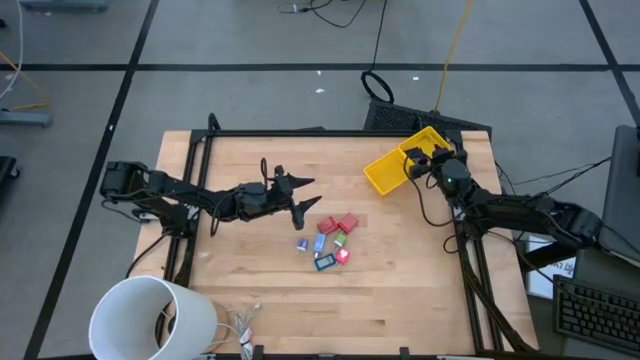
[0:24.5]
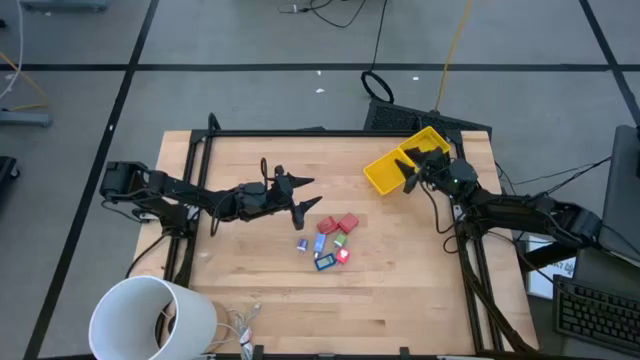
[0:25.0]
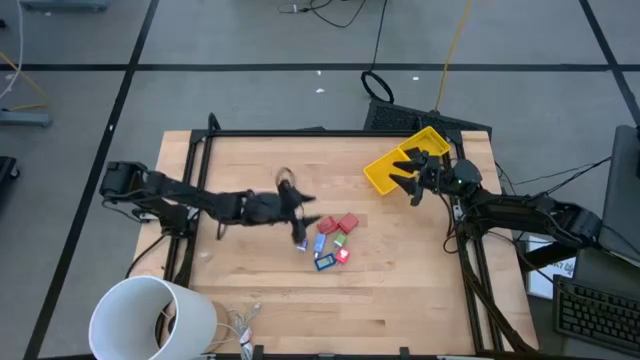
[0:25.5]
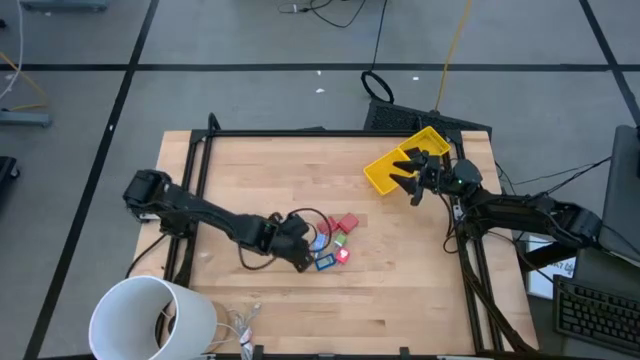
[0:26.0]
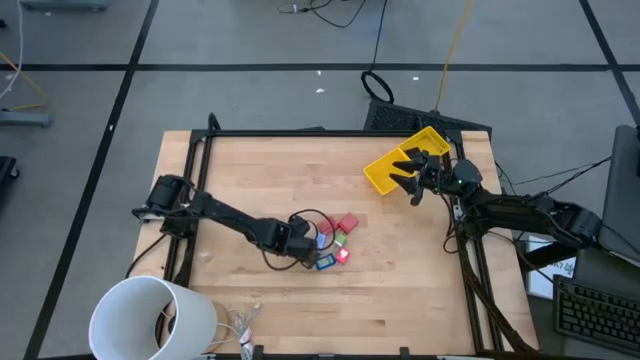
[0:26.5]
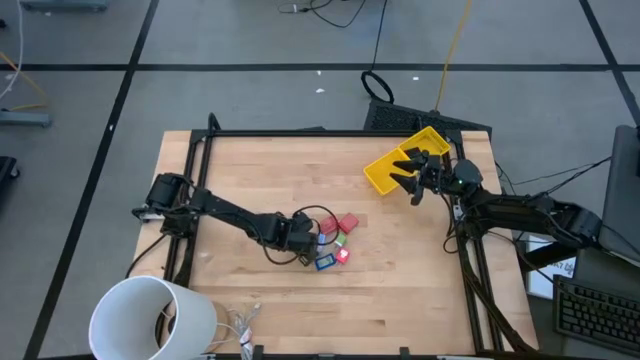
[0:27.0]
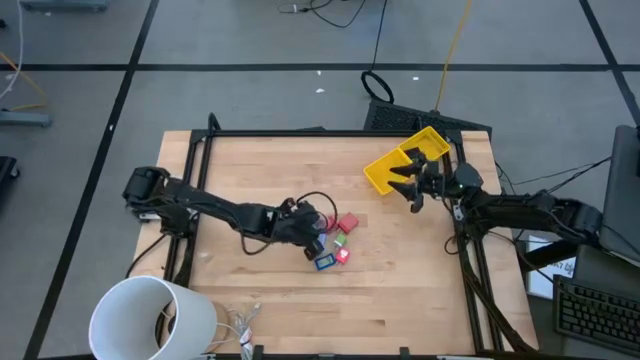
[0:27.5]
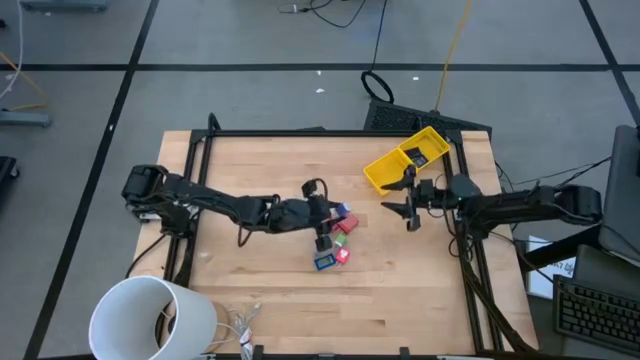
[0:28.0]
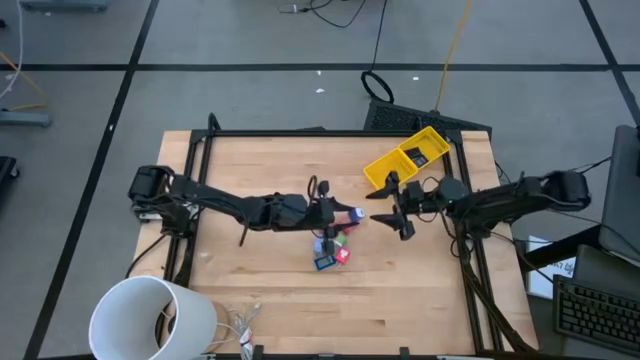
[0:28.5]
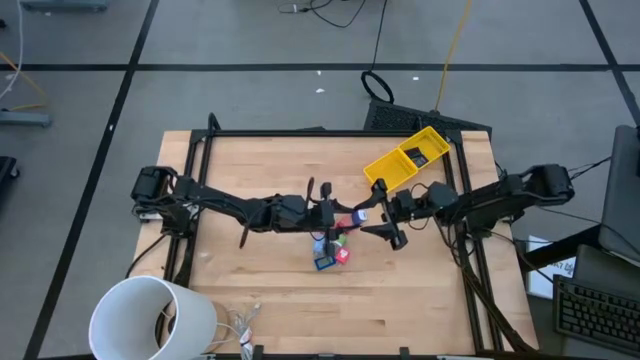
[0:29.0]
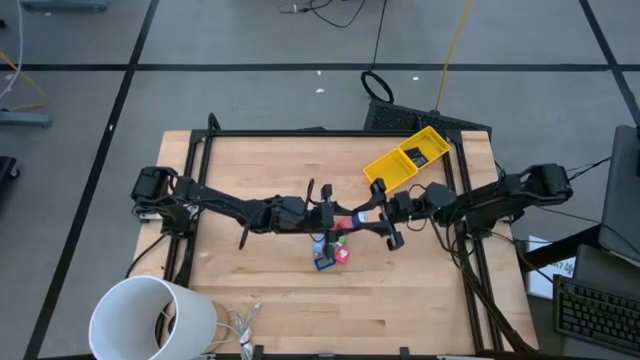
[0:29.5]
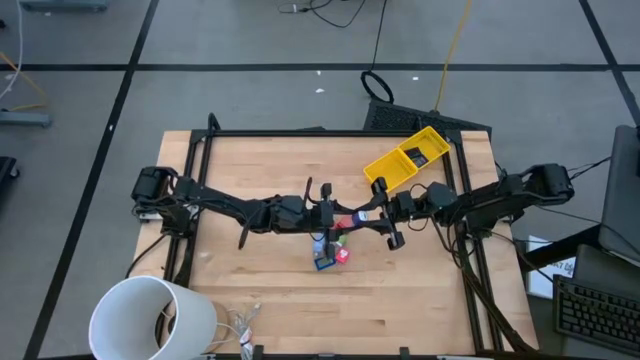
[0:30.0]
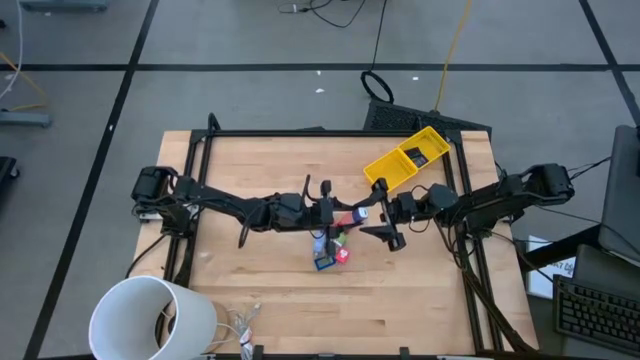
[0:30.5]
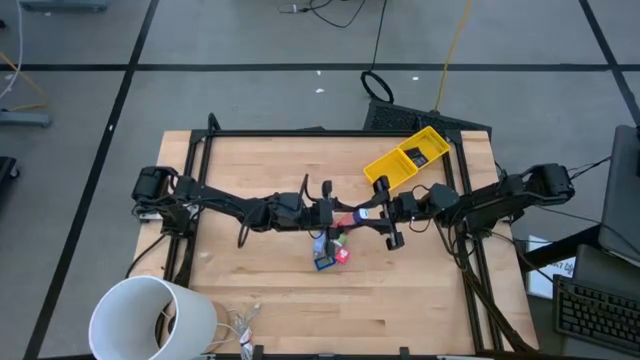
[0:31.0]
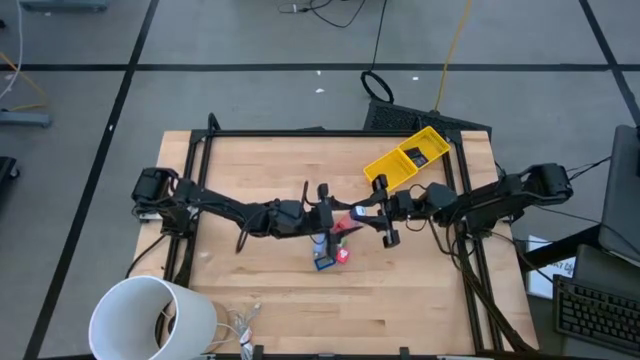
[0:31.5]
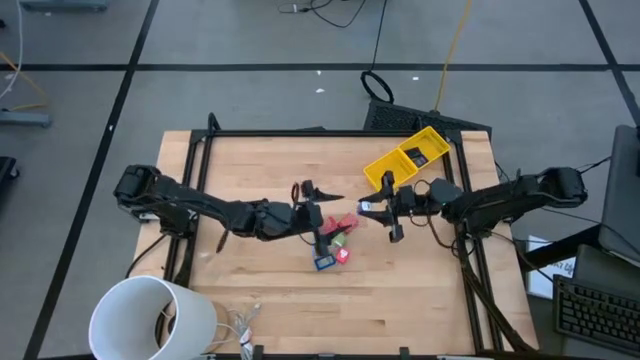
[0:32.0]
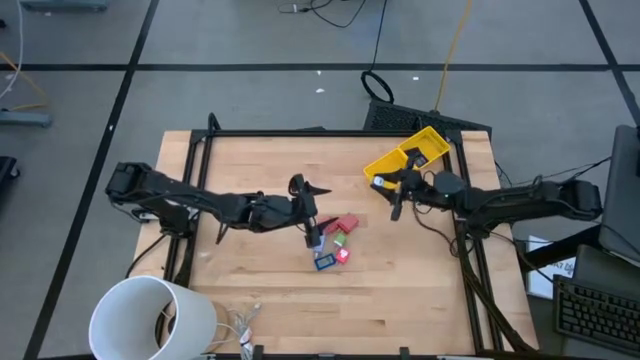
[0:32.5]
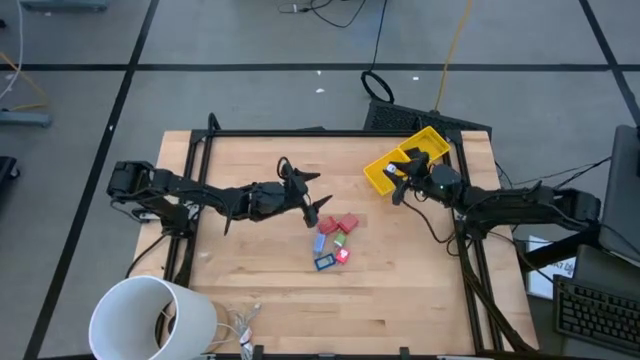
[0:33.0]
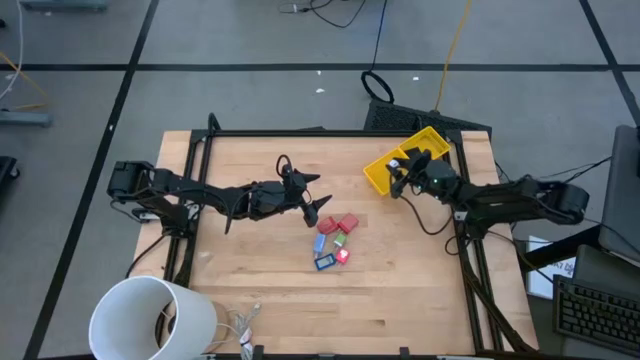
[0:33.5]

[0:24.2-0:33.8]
Task: Pick & Place Office items
Put the violet charger adapter into the left yellow bin

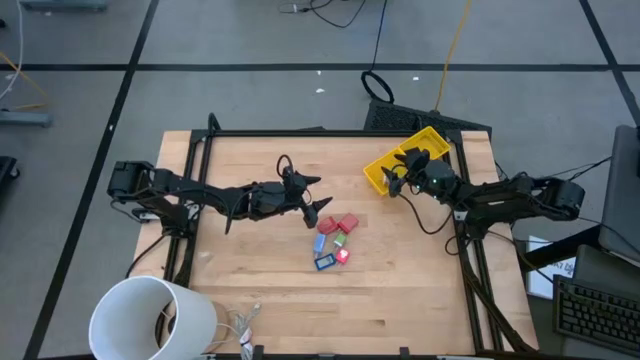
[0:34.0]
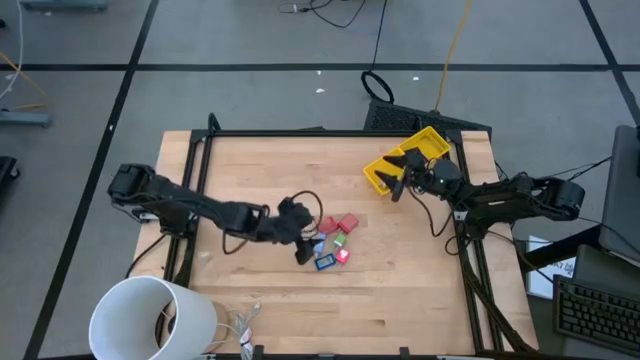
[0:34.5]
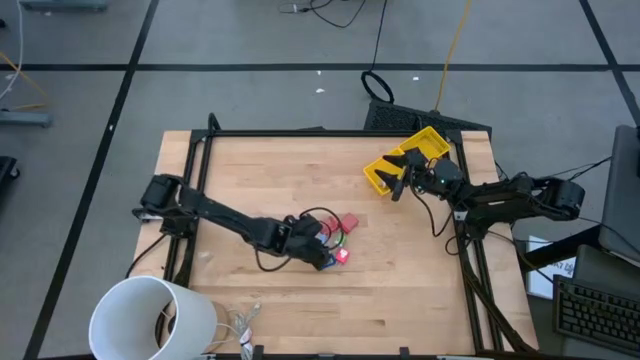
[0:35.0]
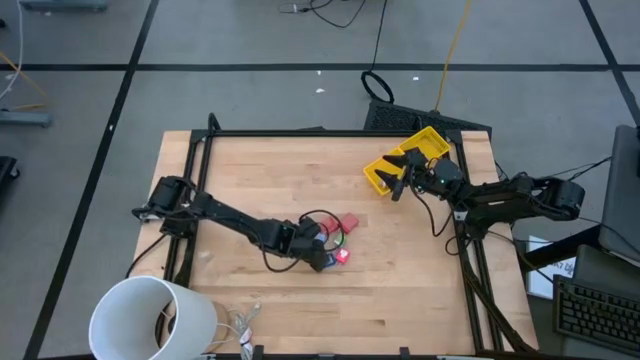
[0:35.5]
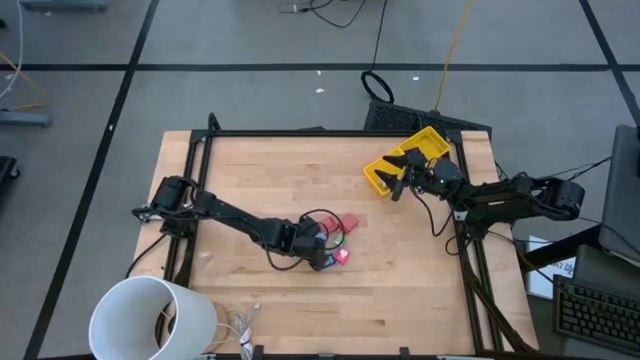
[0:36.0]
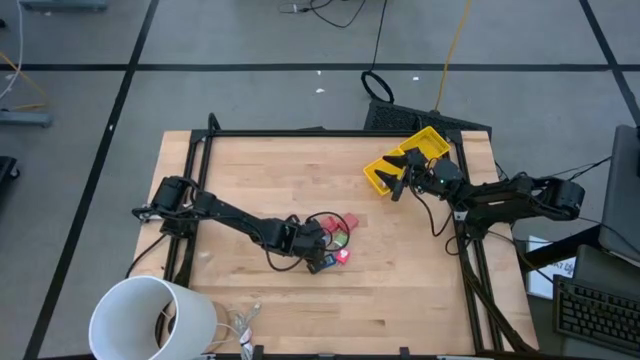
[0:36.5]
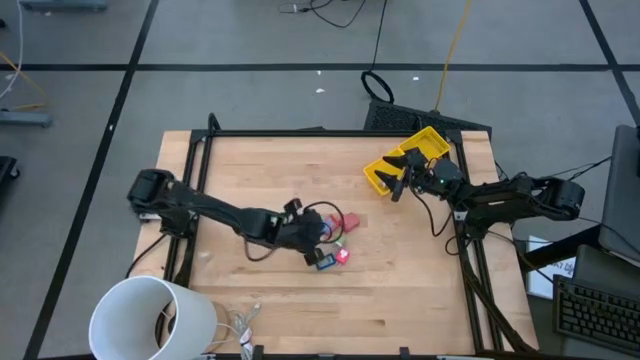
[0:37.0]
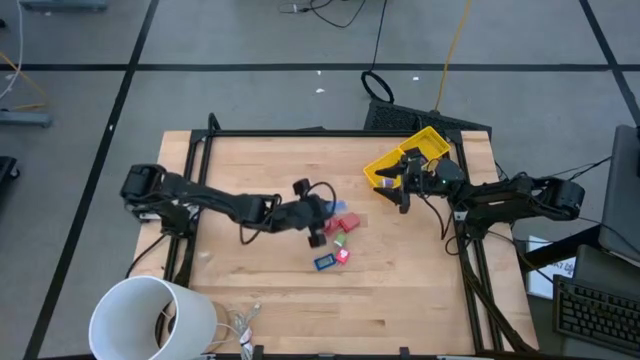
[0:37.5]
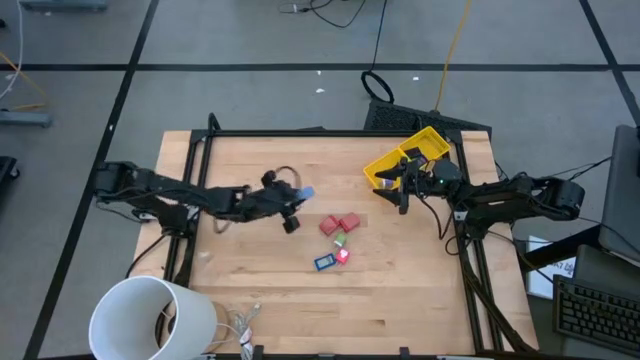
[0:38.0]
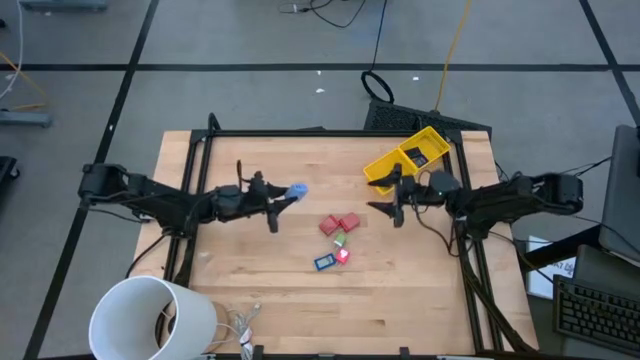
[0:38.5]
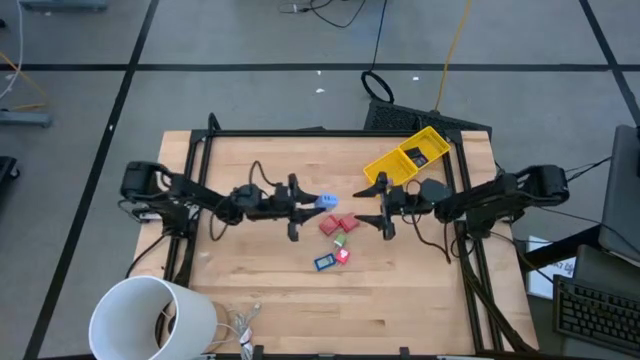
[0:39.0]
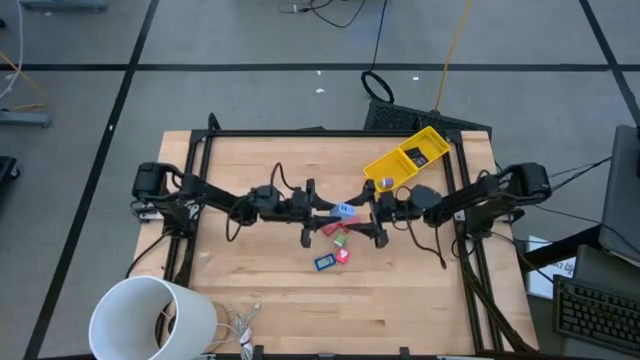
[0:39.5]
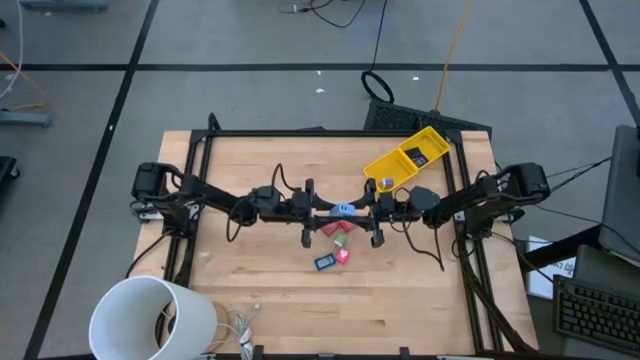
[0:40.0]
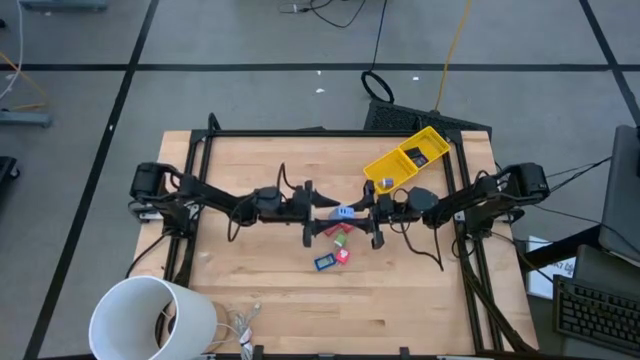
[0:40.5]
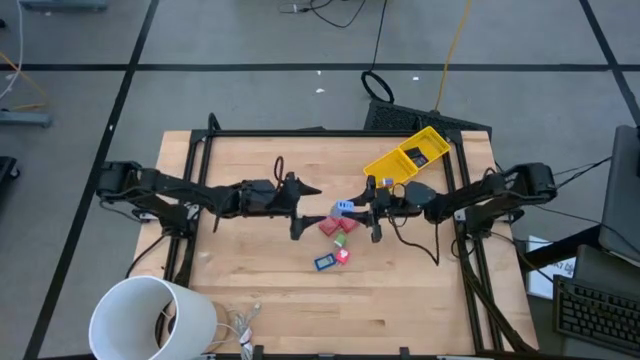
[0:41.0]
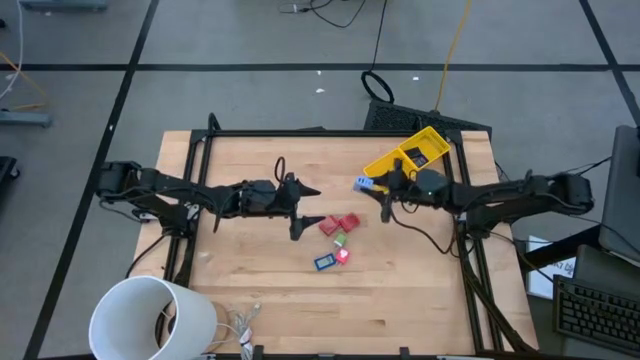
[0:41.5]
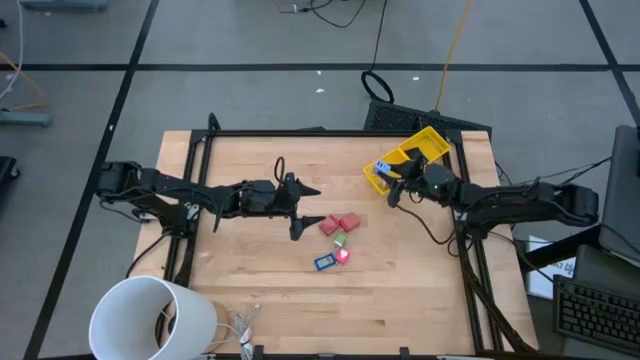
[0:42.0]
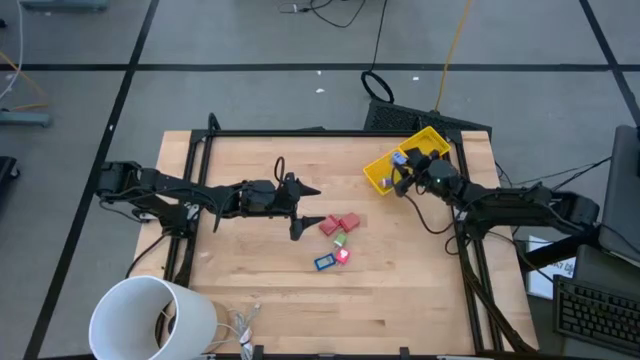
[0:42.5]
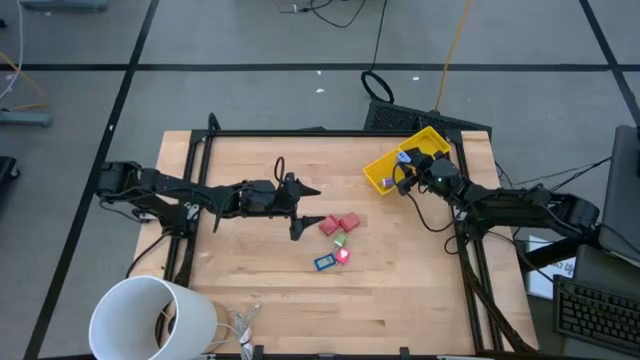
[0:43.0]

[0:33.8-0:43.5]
Put the light blue charger adapter into the left yellow bin

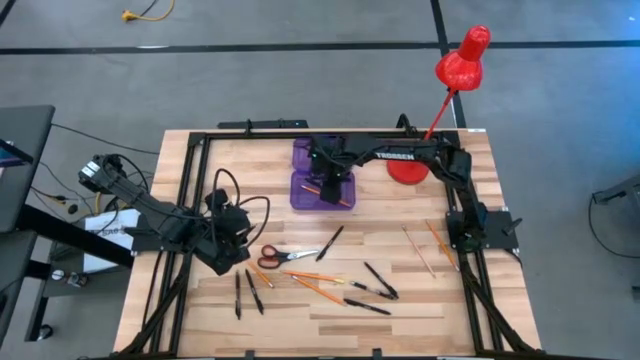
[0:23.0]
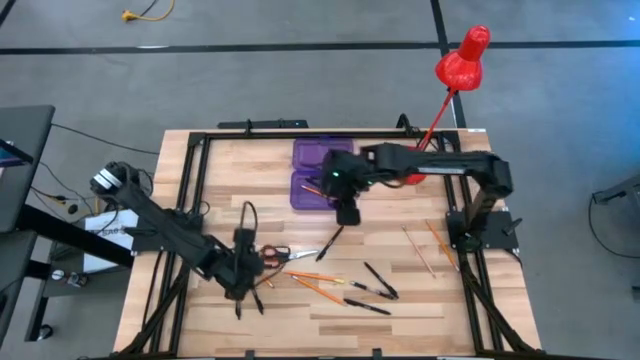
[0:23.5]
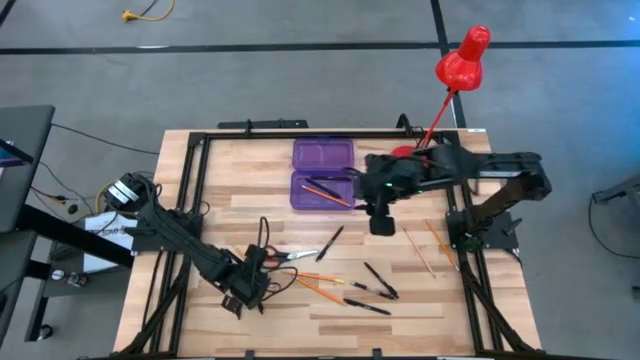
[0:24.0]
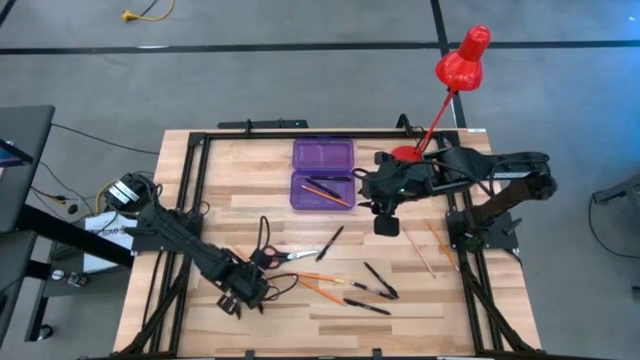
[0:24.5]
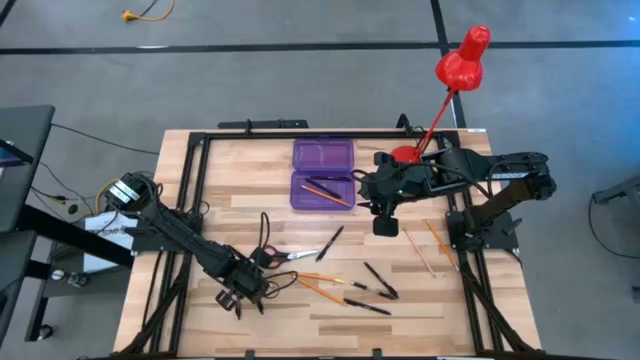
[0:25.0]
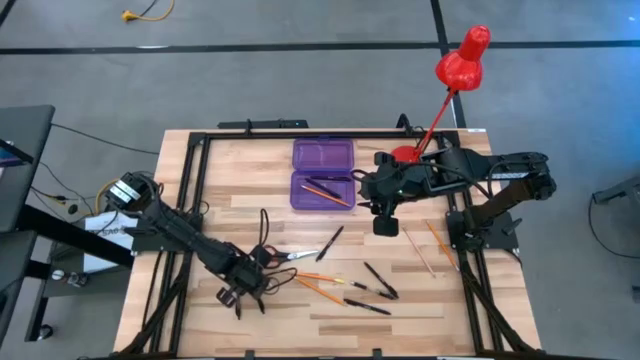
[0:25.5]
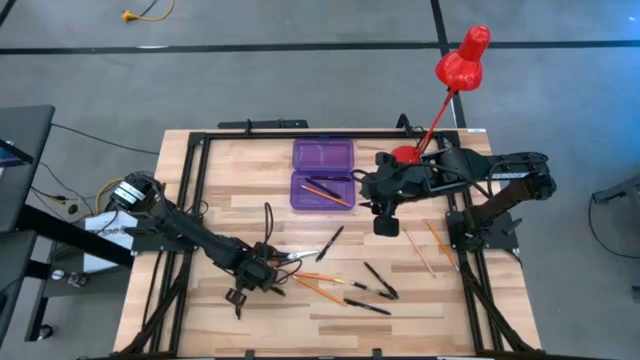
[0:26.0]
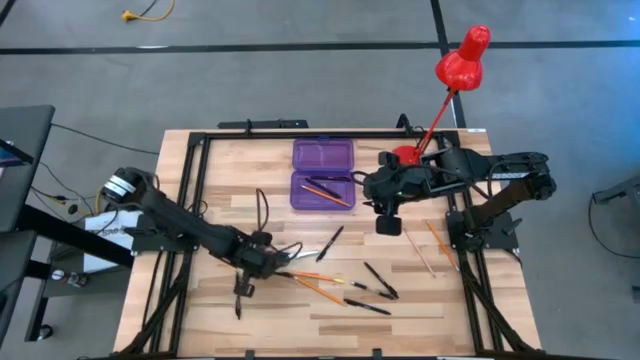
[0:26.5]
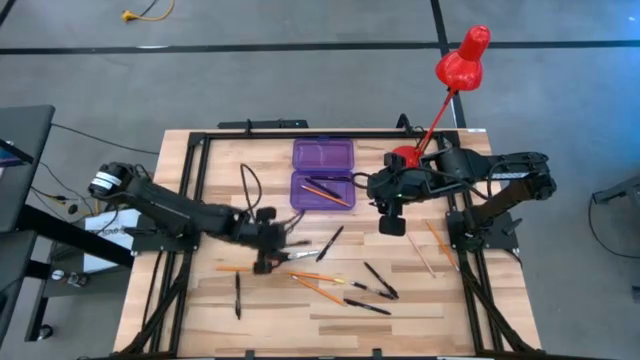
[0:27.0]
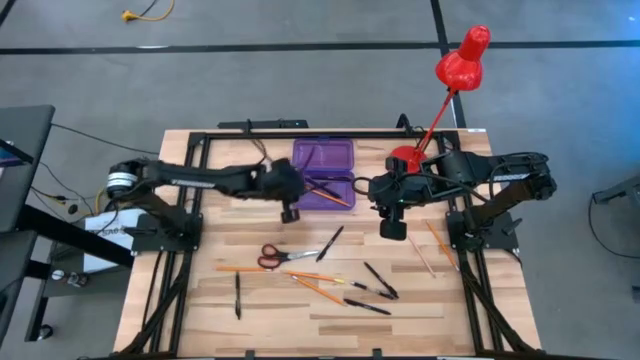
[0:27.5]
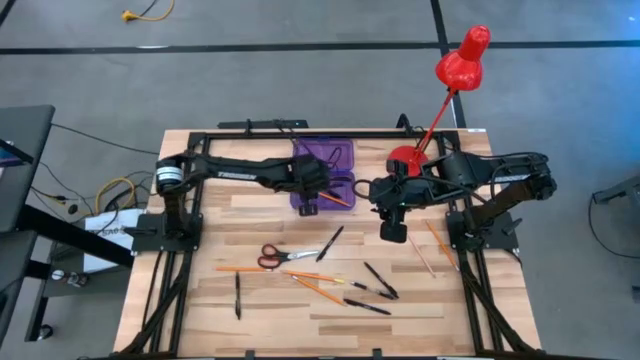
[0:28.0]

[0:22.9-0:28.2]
Task: Pick & place school supplies into a supply box
Put the black pen into the purple supply box
